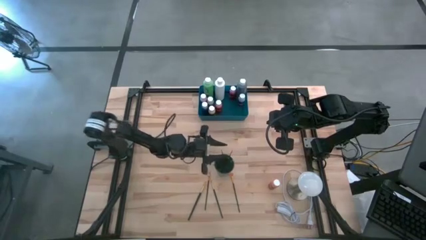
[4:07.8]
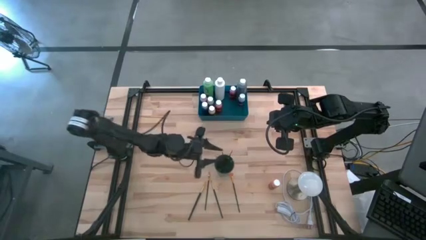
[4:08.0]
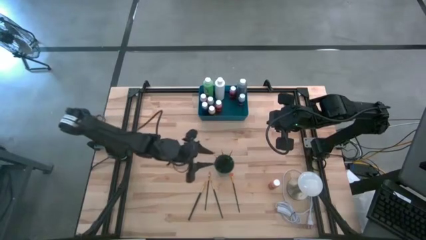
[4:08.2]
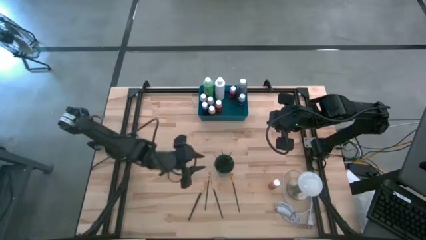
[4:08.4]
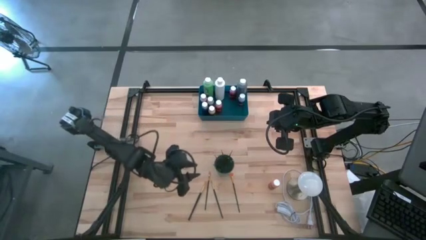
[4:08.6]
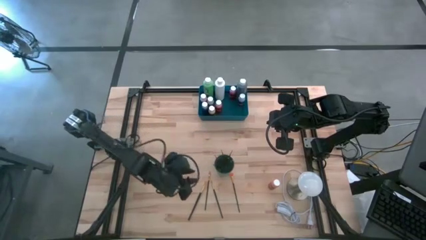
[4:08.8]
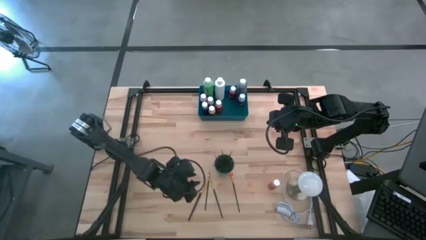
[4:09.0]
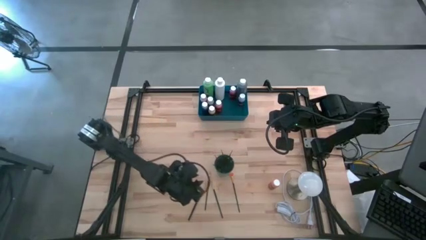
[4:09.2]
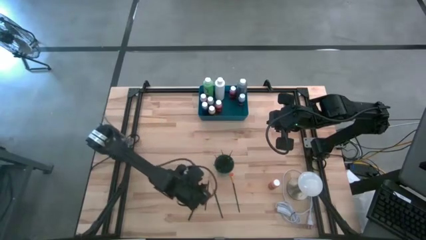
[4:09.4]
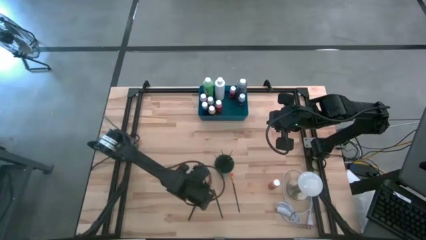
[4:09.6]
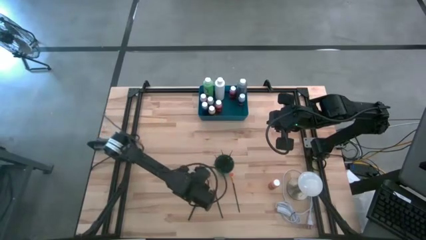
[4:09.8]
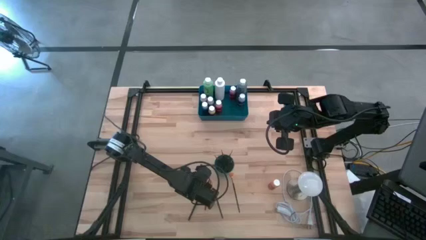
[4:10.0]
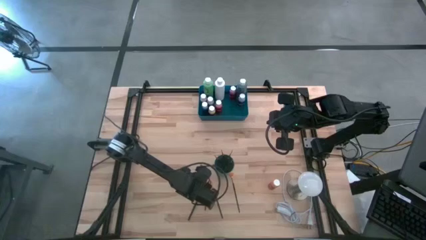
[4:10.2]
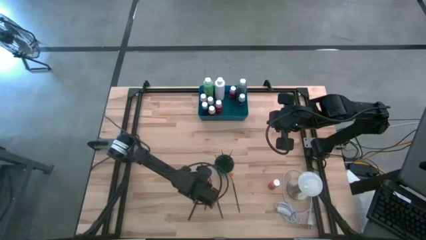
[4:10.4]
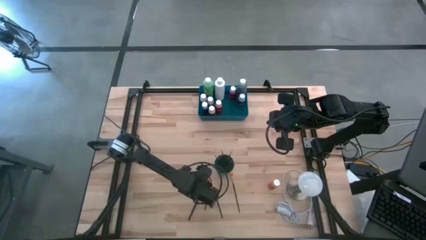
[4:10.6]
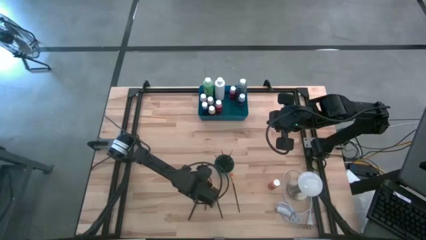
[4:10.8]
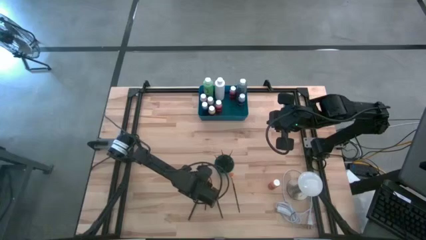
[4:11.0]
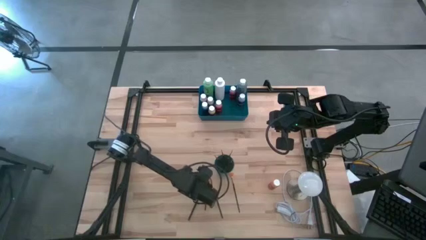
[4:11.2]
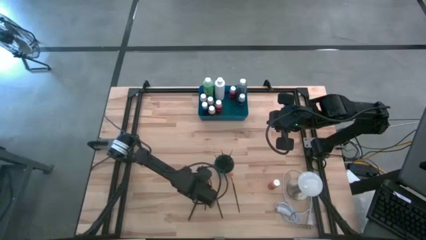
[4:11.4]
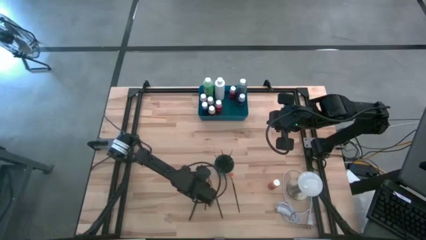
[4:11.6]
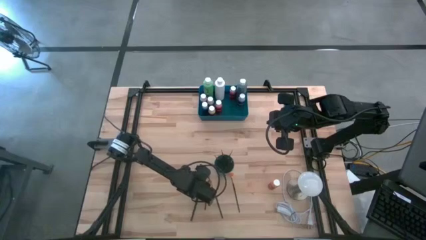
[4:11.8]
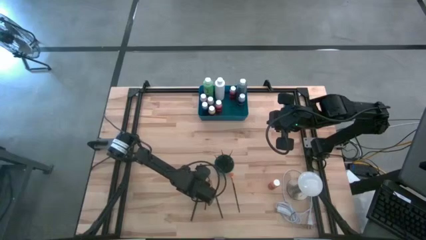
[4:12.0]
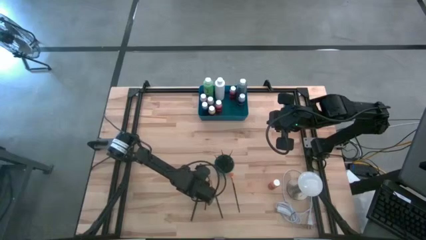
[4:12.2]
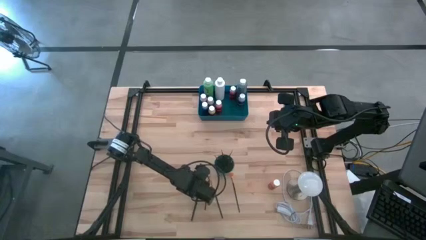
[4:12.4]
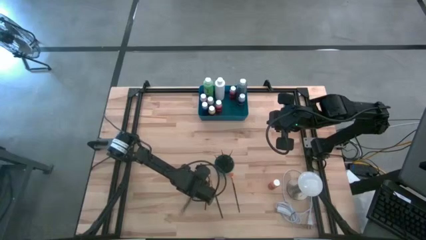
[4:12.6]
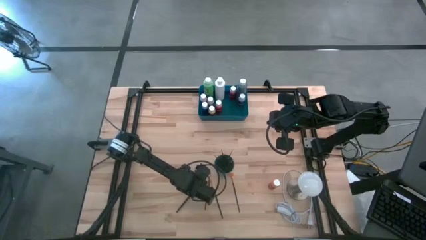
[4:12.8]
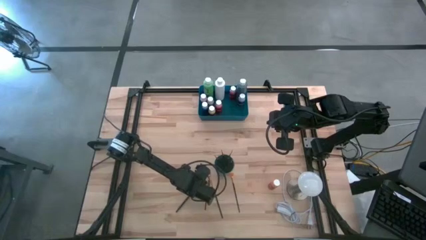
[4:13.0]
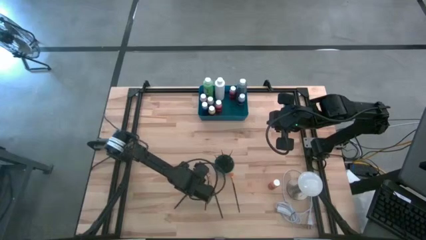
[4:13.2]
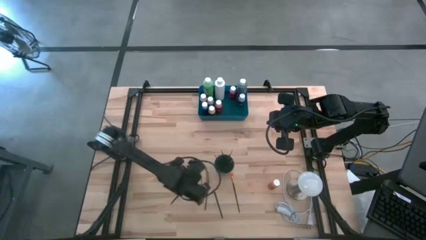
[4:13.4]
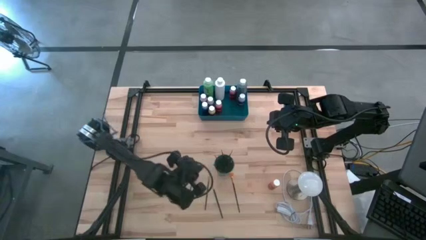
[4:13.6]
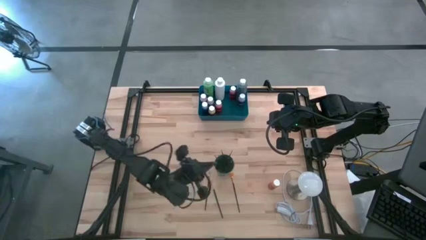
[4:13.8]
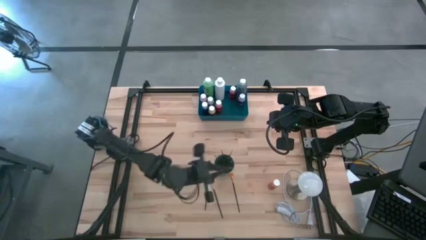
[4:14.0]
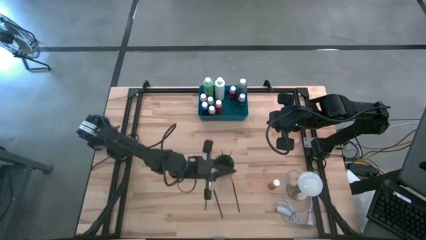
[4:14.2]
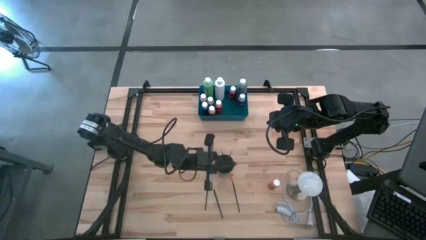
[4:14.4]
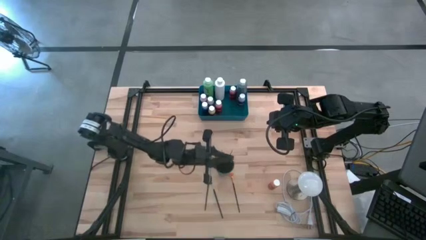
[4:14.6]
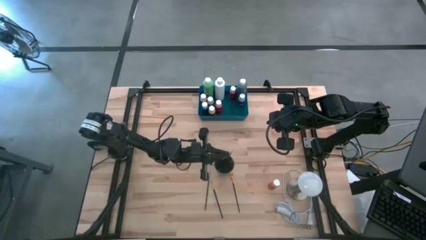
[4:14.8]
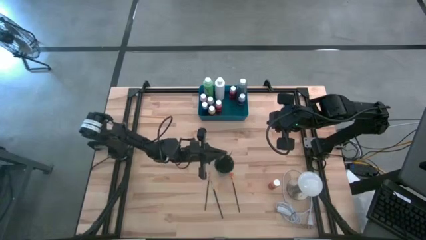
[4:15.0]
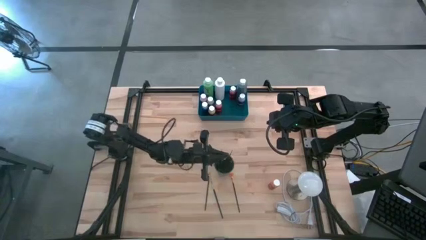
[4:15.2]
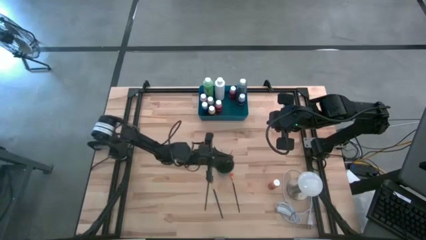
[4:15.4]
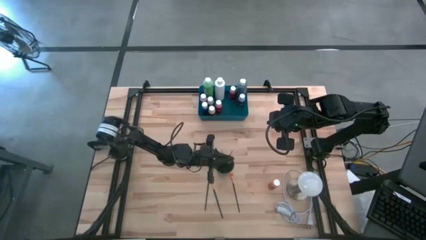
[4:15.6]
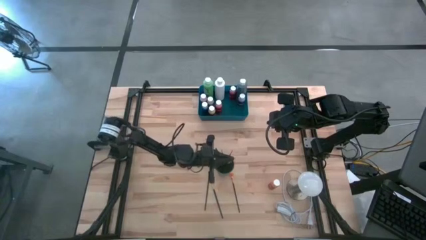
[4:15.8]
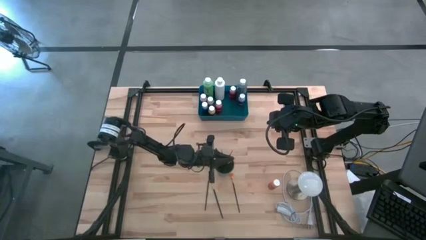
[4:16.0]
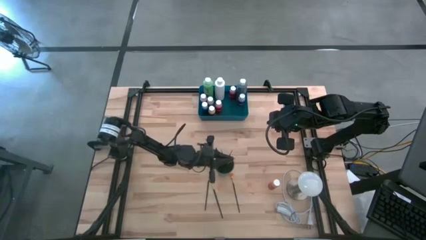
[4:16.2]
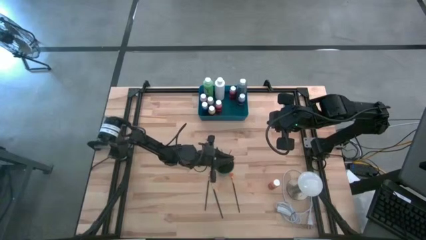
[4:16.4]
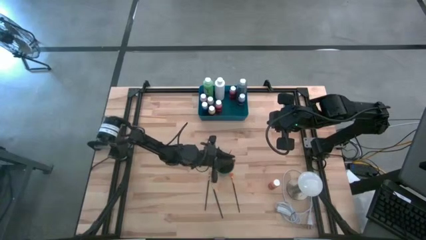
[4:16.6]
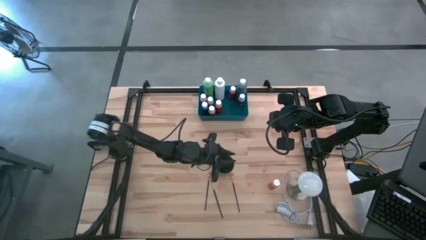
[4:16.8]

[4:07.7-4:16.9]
Task: Pick & Place Paint Supplies
Put the yellow paint brush into the green cup

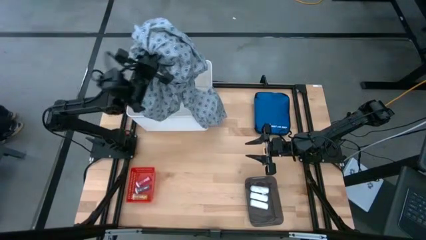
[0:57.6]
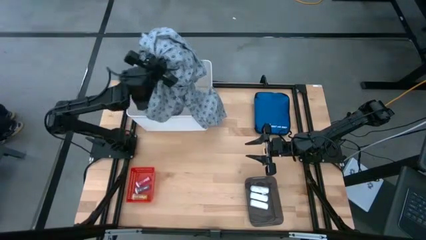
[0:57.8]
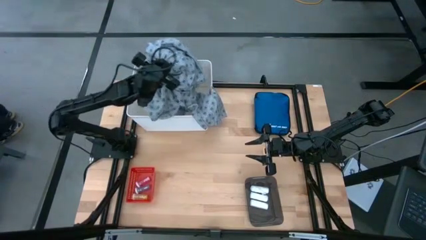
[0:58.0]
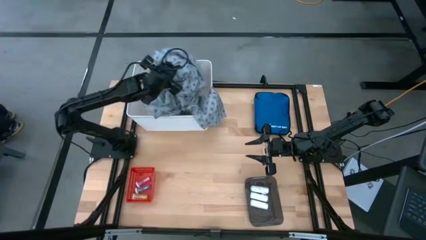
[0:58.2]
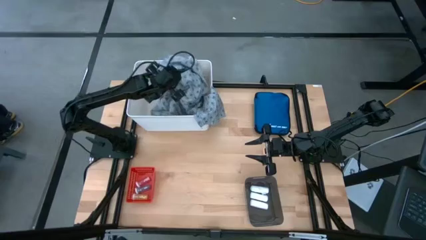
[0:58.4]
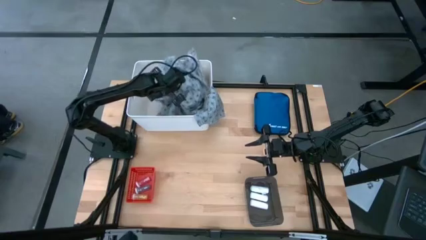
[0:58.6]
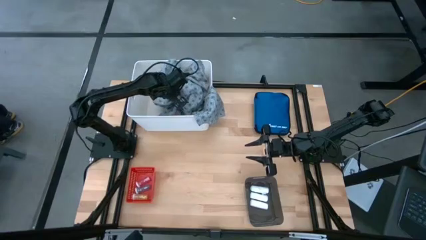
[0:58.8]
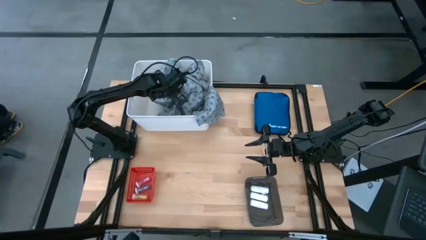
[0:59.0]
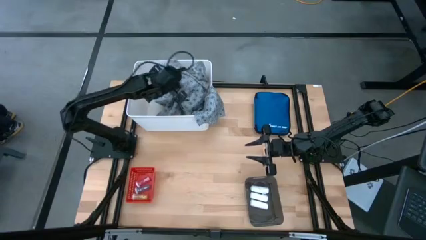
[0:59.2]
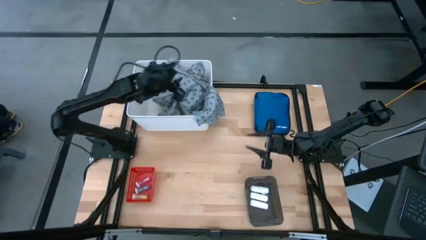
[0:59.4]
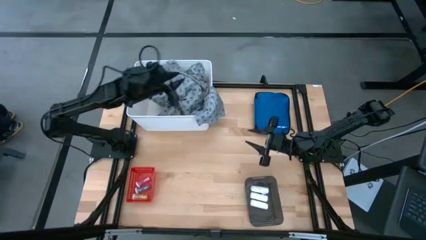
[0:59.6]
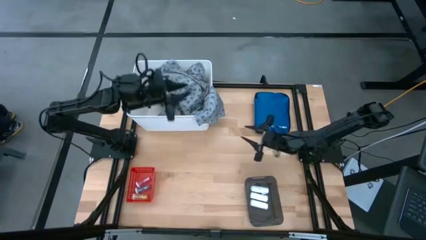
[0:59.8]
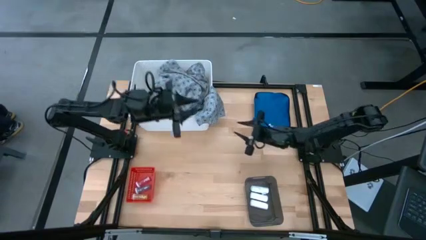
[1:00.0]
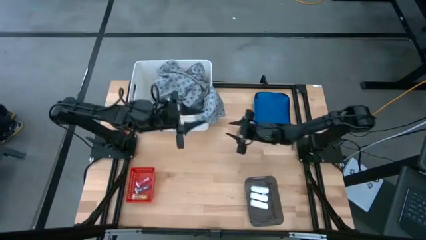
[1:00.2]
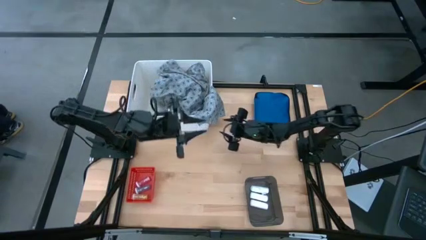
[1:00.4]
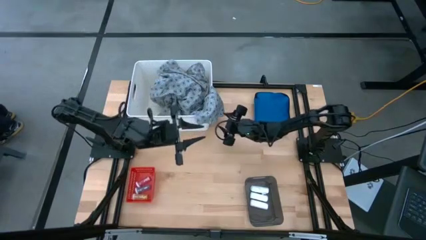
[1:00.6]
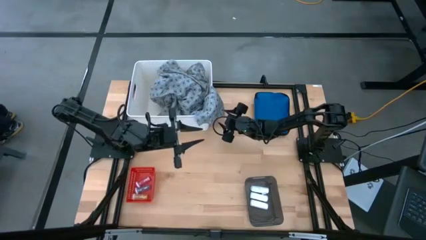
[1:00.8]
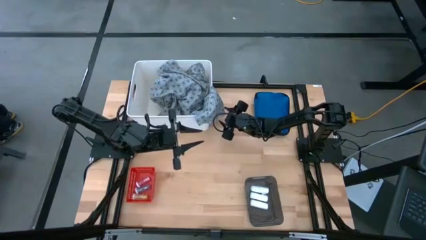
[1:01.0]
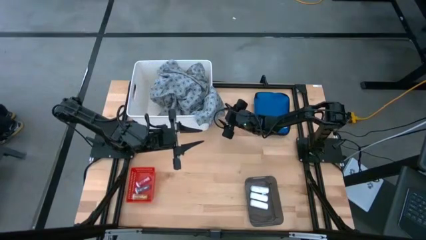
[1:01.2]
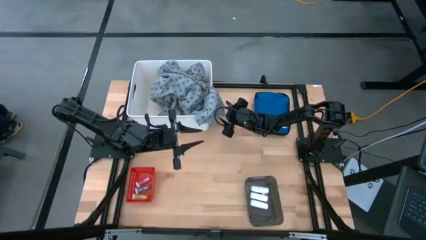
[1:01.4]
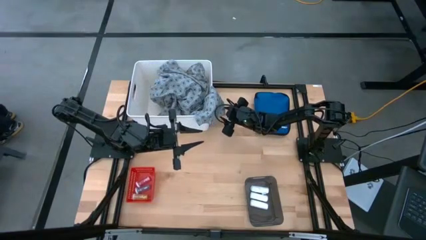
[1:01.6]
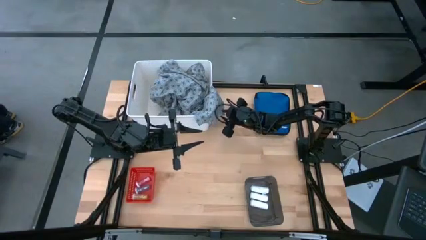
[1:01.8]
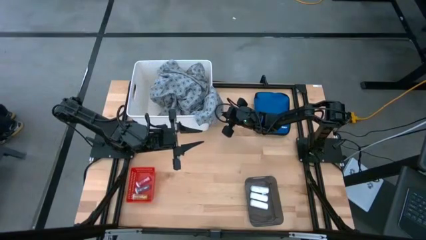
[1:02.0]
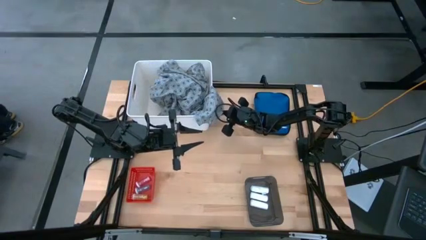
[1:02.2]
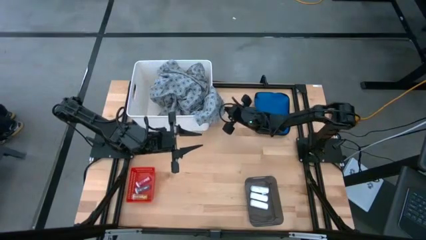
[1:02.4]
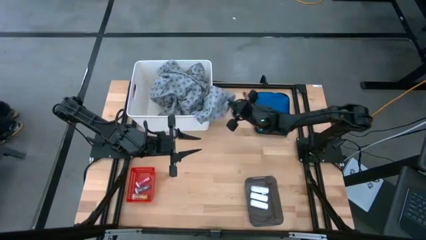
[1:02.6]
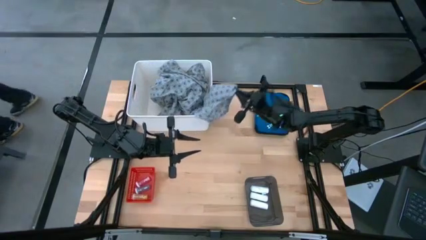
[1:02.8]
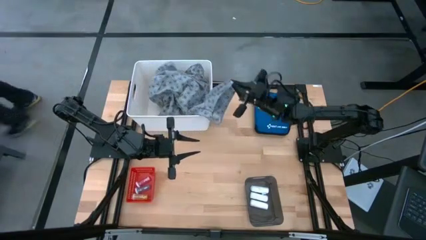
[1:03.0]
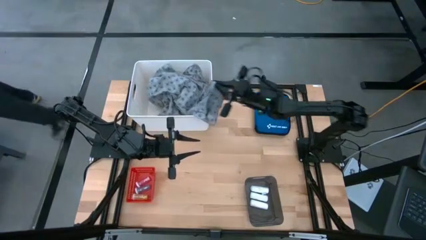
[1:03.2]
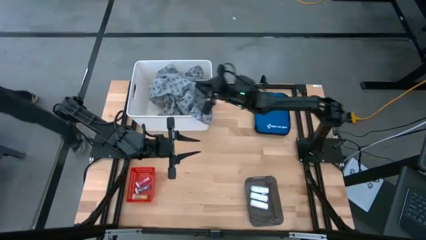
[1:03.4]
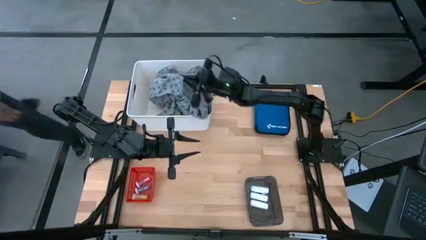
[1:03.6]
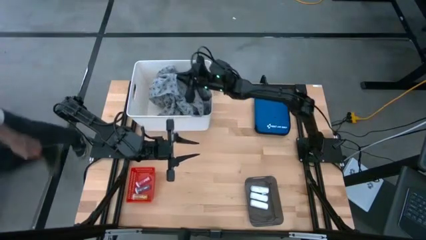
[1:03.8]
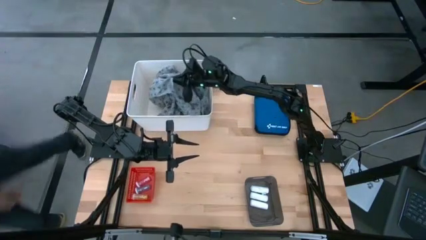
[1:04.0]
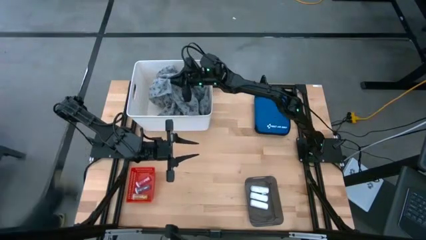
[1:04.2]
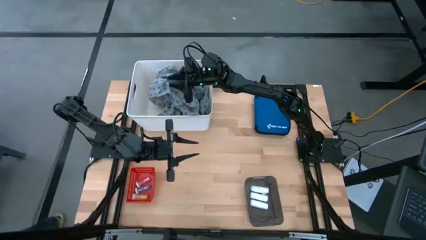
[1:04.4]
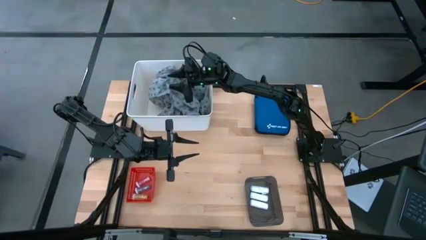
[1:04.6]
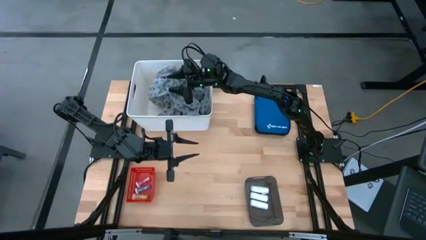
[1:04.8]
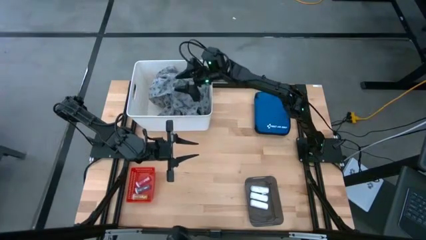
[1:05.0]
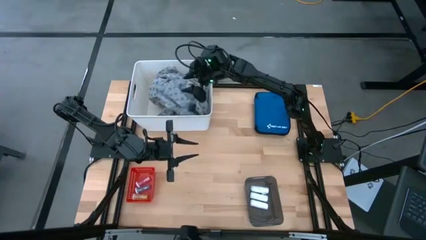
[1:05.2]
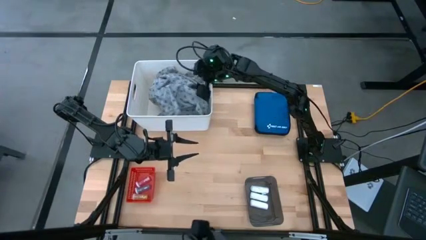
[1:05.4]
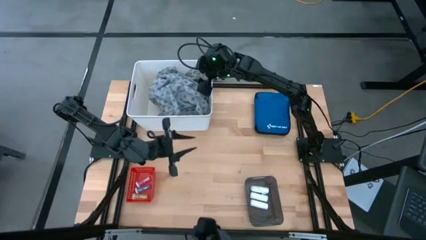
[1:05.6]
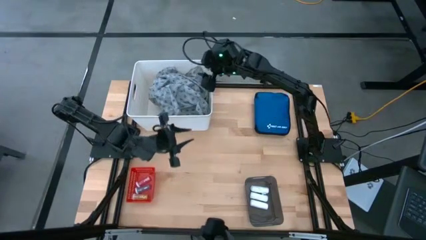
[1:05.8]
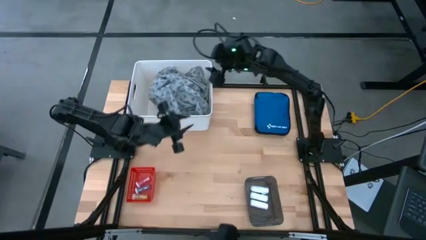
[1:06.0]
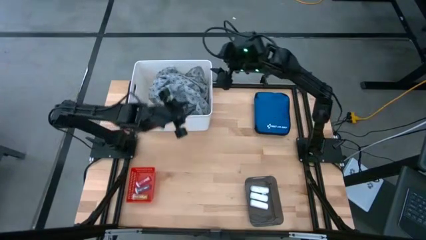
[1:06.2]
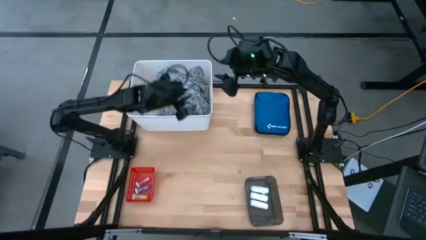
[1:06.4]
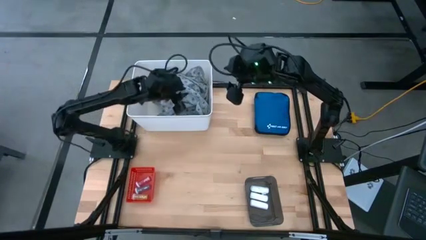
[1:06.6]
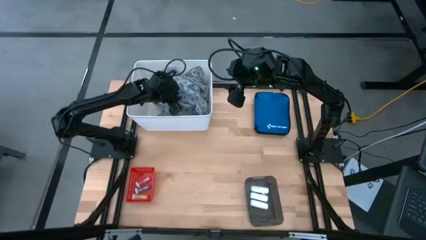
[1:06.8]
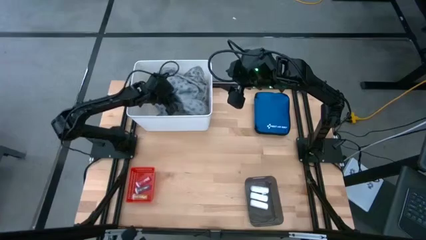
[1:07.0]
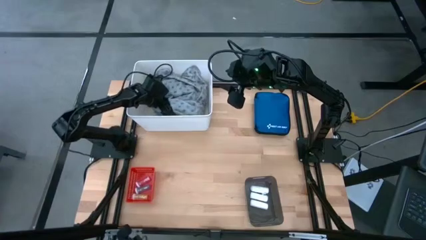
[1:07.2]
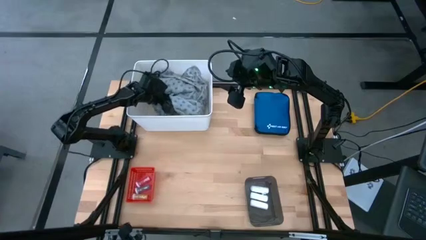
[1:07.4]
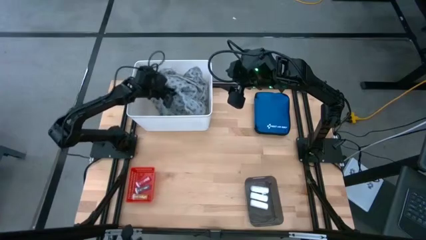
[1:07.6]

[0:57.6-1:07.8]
Task: Pick & Place Medicine items
Put the gray patient gown into the white bin
